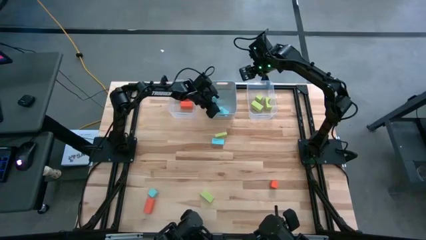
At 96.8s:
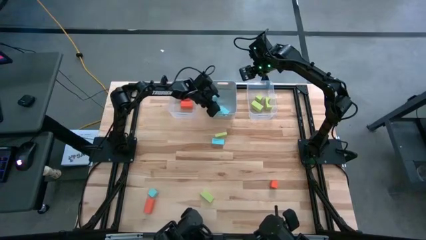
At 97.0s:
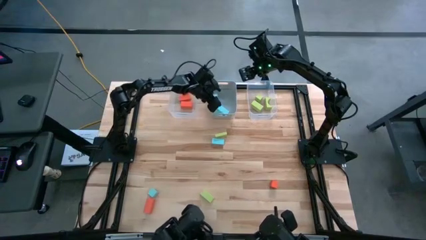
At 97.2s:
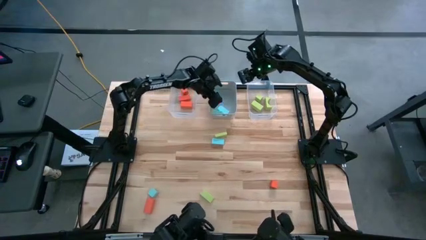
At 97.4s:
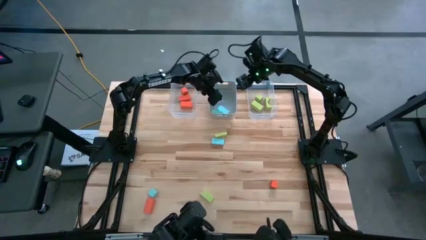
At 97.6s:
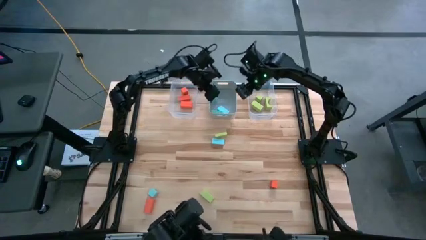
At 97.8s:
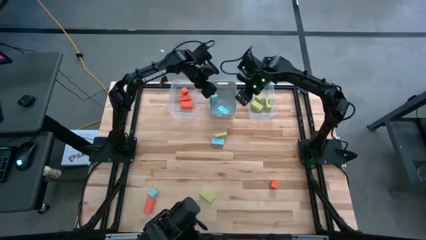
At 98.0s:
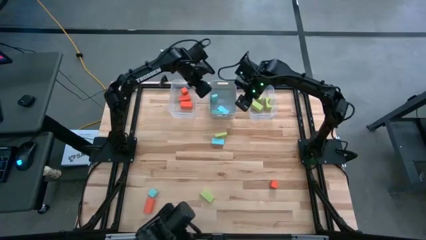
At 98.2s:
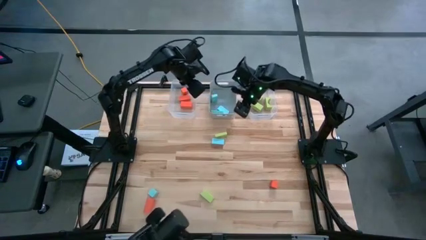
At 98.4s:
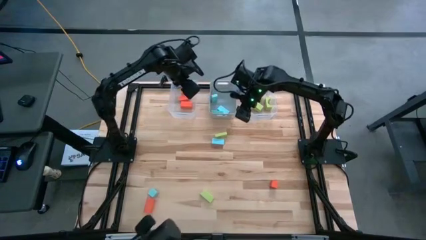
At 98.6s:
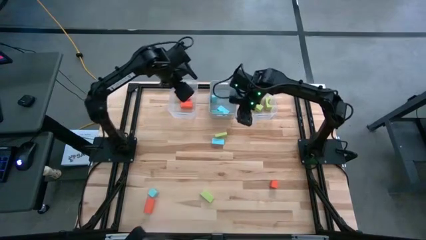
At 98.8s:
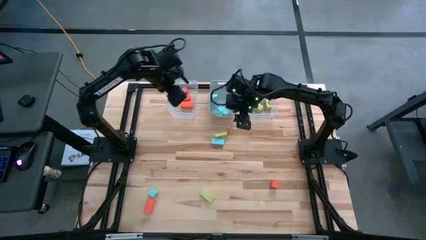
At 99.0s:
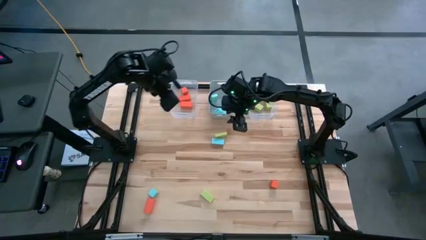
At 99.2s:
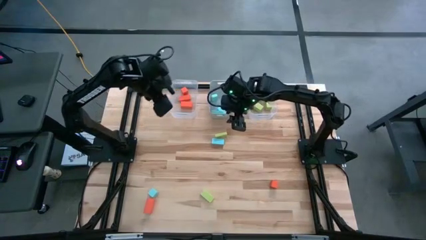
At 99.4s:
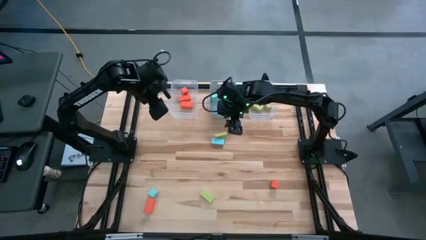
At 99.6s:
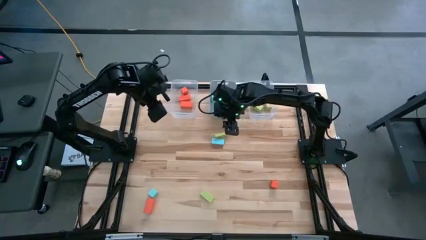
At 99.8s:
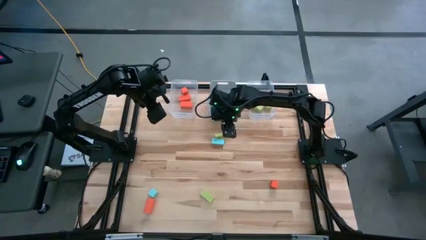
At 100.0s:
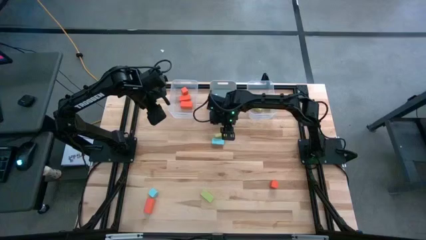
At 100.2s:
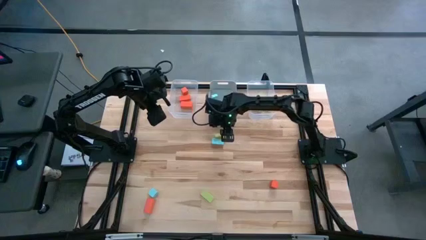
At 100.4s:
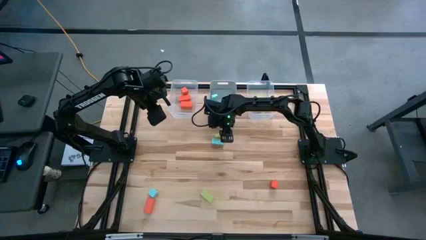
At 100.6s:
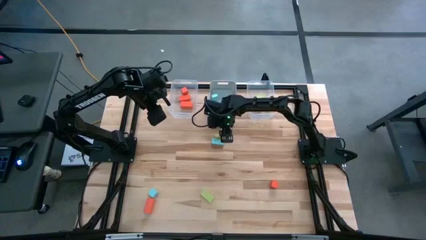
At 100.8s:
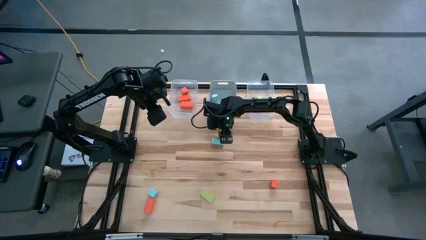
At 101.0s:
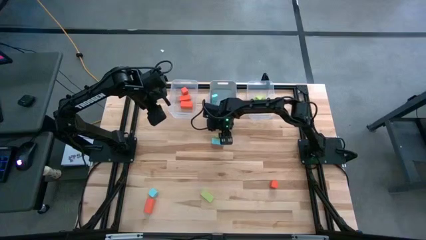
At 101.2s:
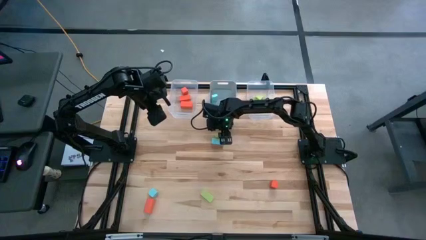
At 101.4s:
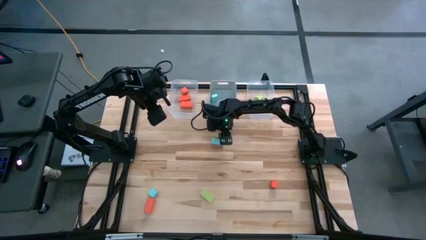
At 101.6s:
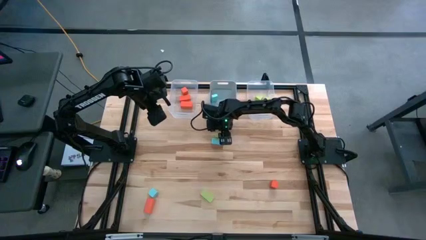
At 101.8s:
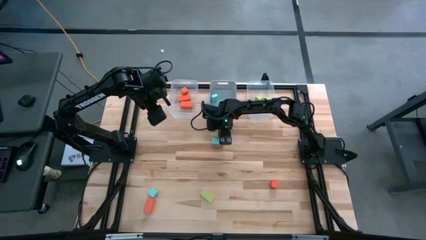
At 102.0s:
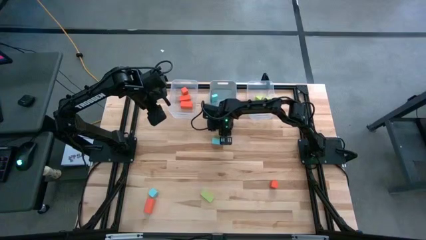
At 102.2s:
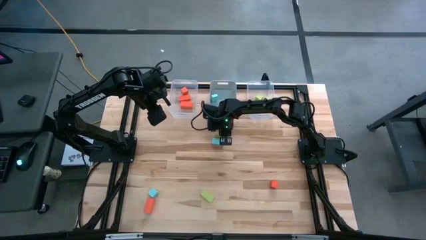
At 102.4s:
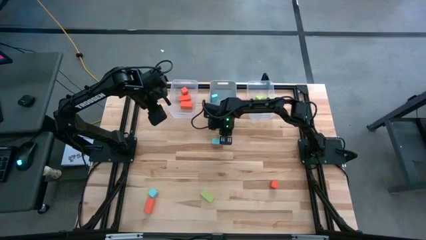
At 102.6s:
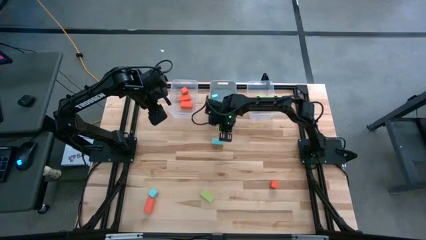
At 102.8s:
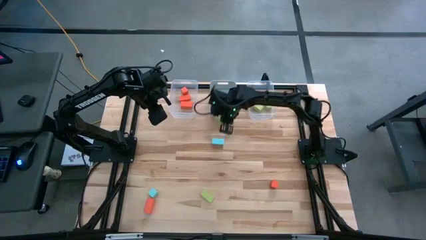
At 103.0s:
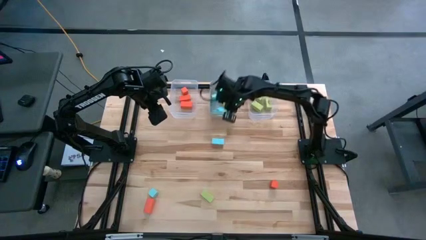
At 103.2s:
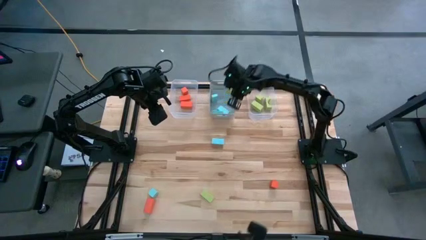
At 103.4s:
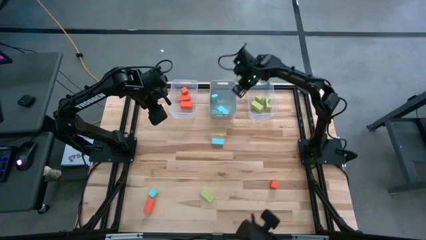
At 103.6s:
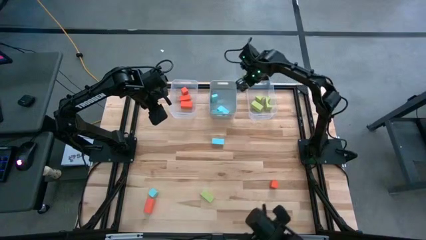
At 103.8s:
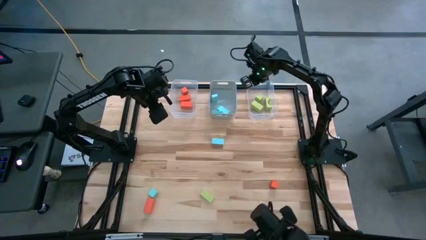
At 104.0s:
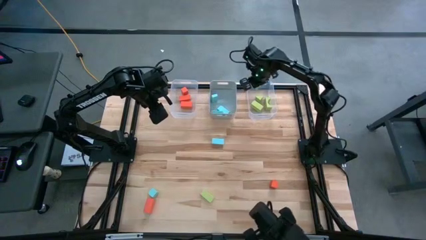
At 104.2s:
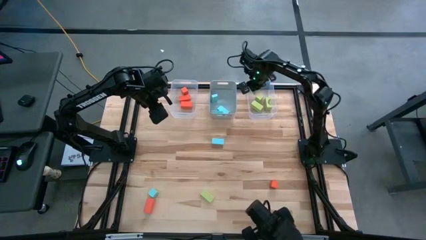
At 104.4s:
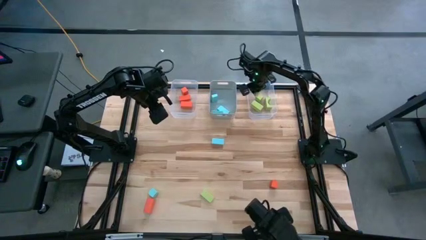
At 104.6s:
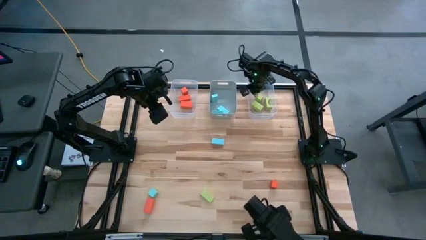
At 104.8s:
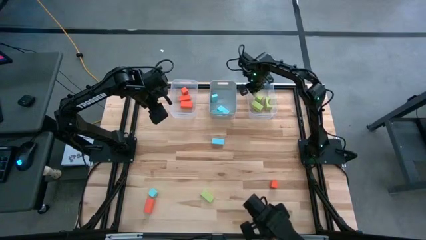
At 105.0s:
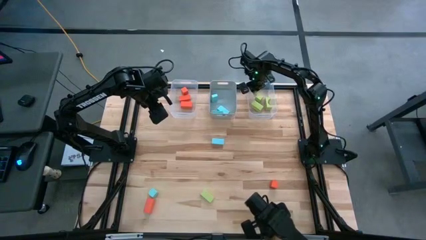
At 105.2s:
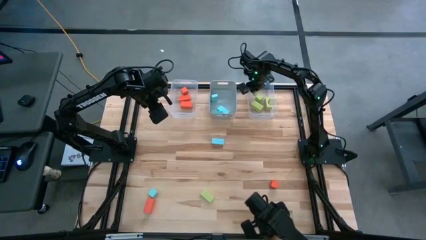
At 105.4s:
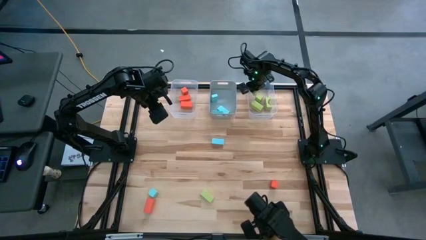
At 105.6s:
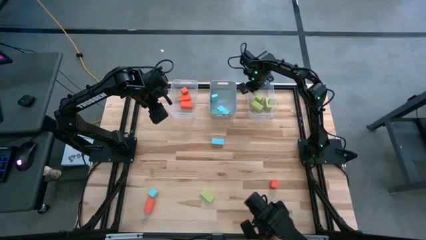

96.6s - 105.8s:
Task: Sort & place blocks by color
Put the green block into the right transparent bin

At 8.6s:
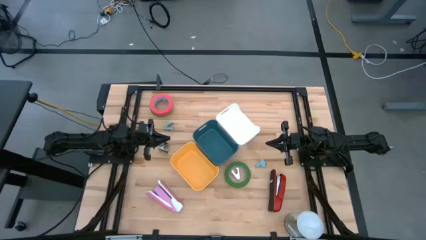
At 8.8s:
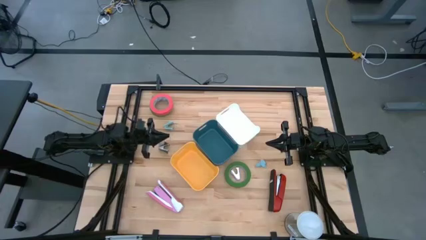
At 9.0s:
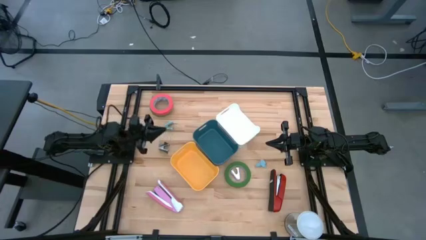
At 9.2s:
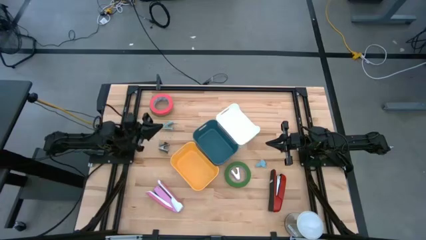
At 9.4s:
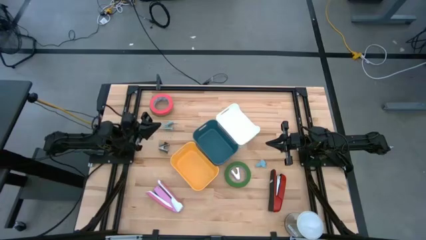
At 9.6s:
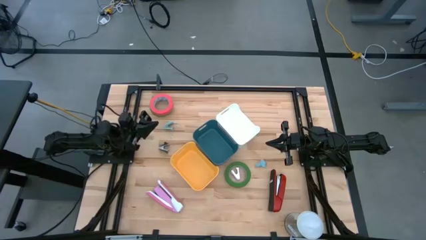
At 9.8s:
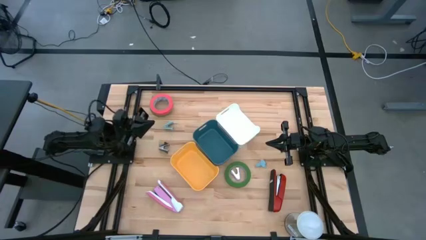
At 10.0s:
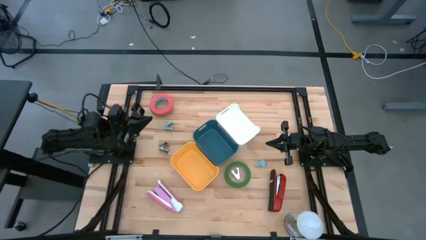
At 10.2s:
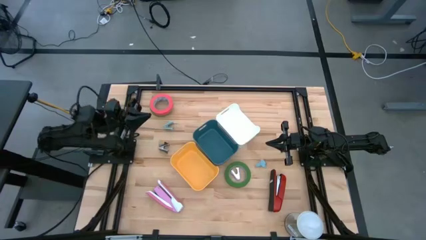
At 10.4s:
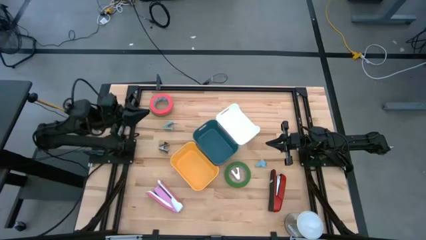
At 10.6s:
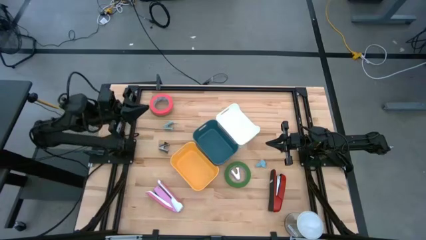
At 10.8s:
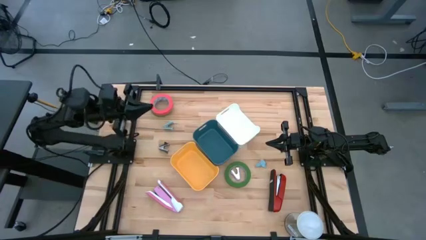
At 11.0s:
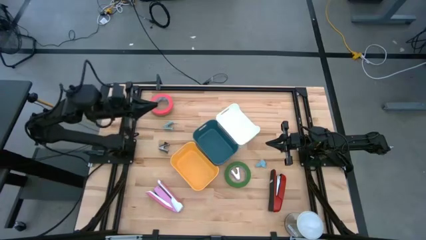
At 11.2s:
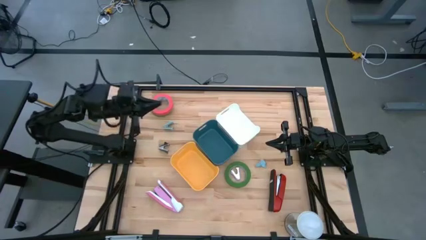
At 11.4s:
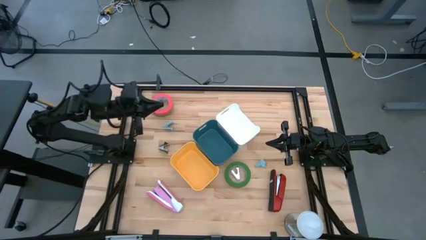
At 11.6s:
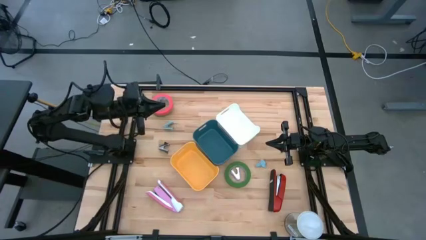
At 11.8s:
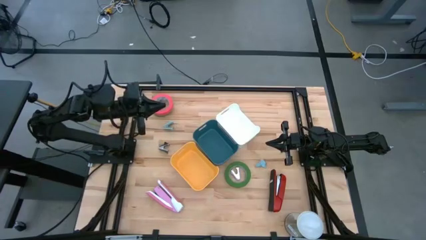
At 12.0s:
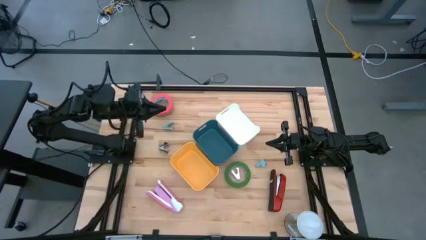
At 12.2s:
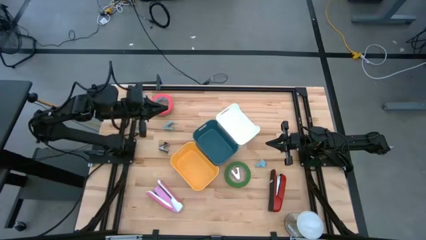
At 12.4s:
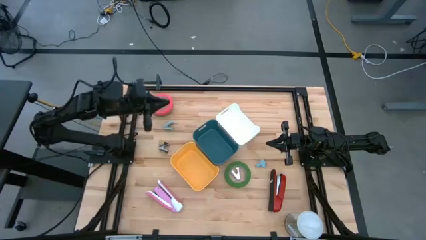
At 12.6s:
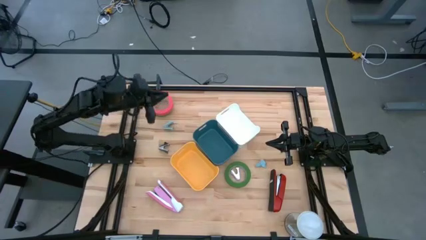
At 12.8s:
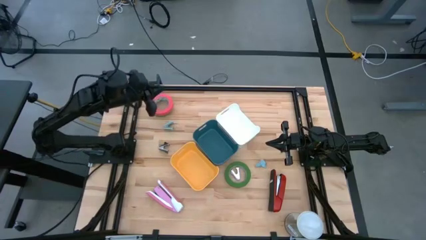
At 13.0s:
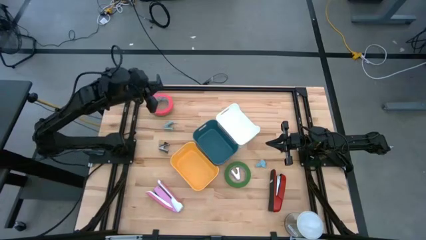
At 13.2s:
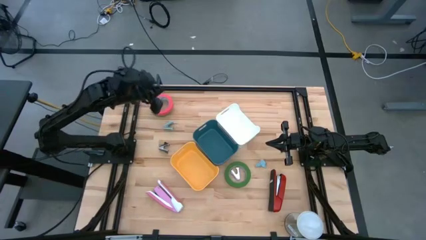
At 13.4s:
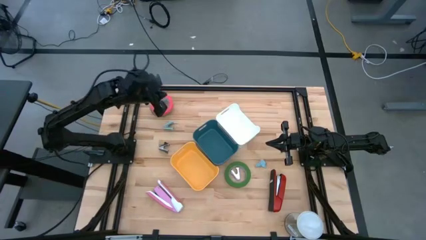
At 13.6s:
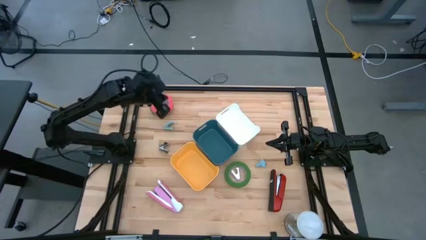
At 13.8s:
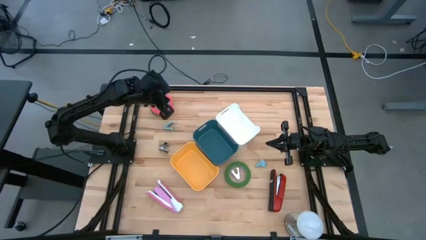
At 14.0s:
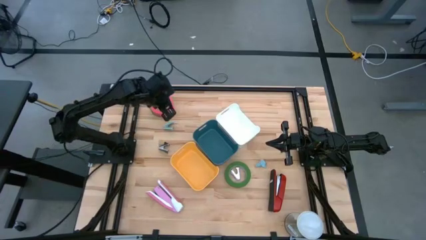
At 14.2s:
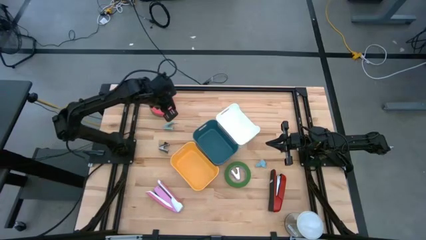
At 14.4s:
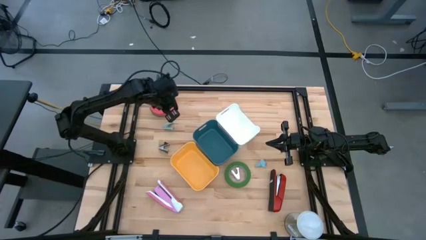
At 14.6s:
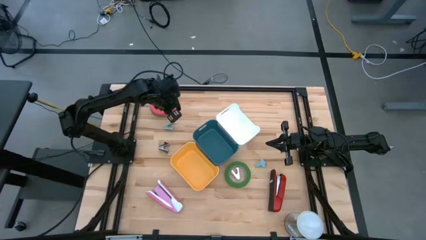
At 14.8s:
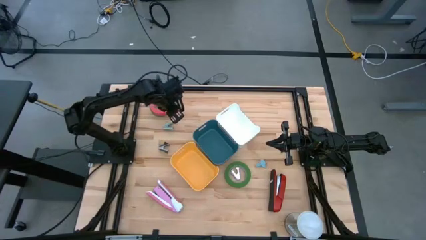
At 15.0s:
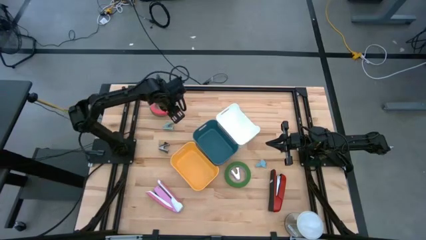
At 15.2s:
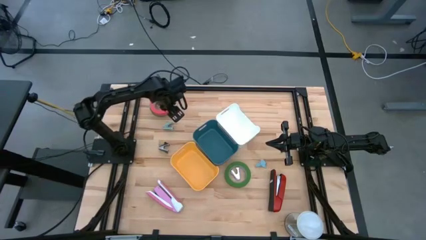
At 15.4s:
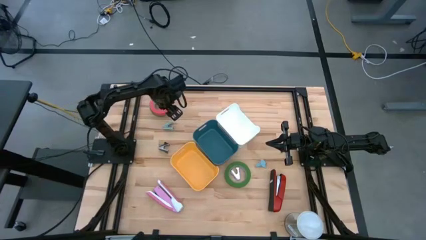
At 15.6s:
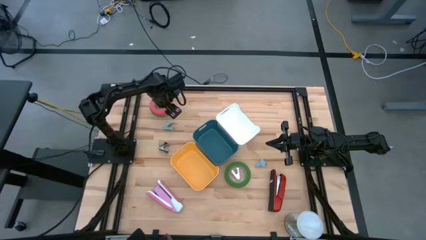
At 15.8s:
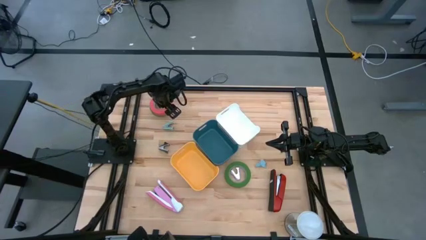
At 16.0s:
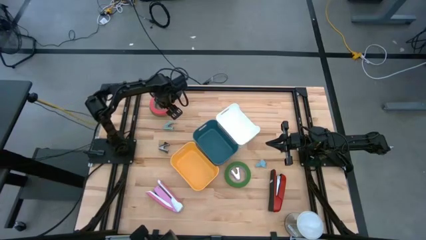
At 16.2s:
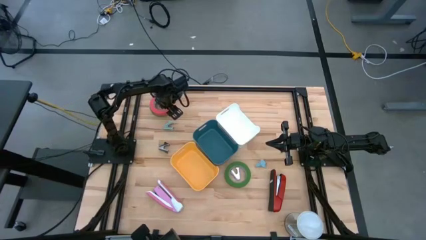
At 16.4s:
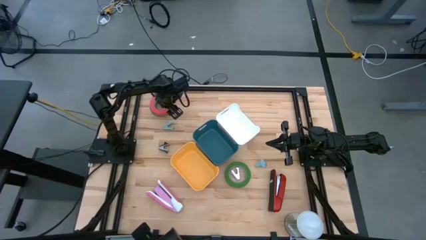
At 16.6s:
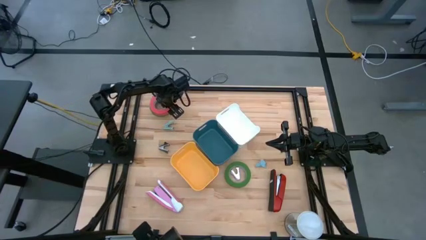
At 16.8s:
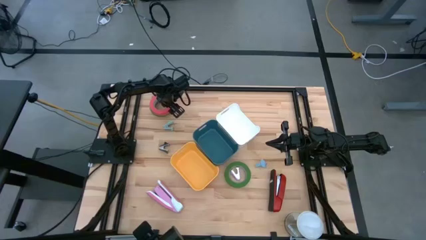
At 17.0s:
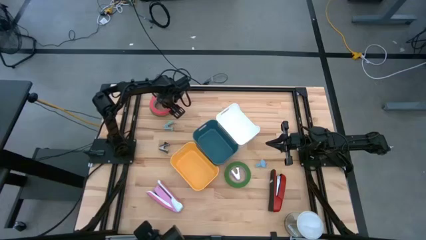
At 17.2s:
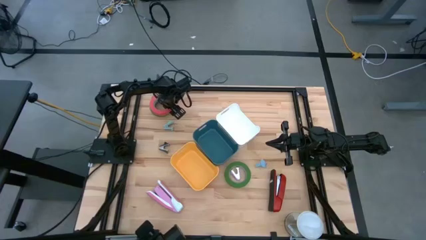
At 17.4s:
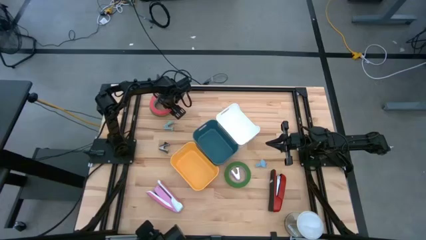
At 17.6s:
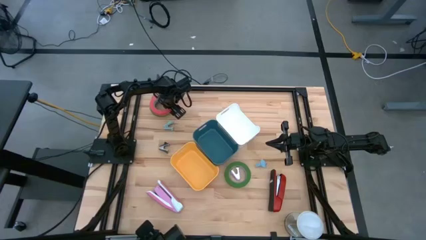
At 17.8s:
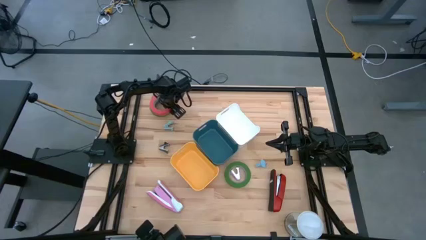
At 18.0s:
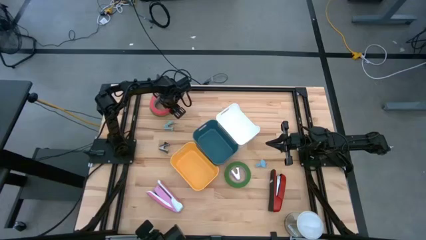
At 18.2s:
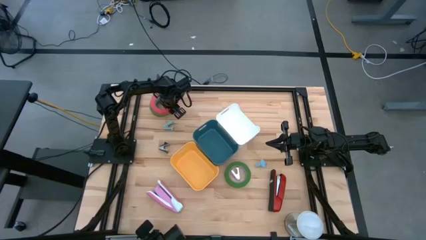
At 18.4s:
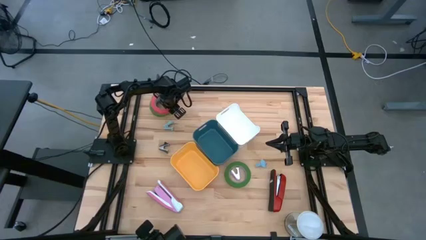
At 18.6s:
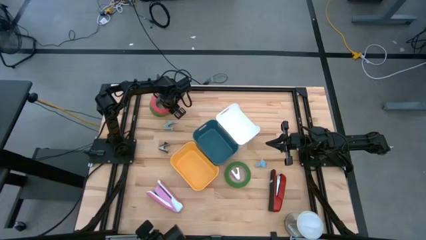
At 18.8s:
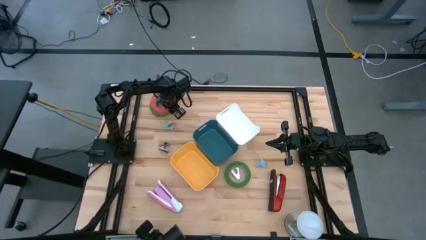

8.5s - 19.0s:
Task: Pick and place Stapler, Stapler remover, tape
Put the pink tape into the yellow bin
